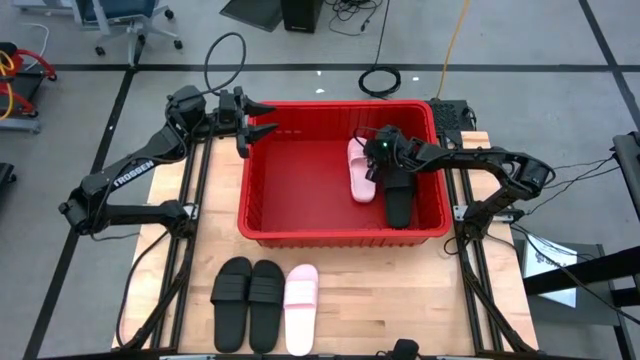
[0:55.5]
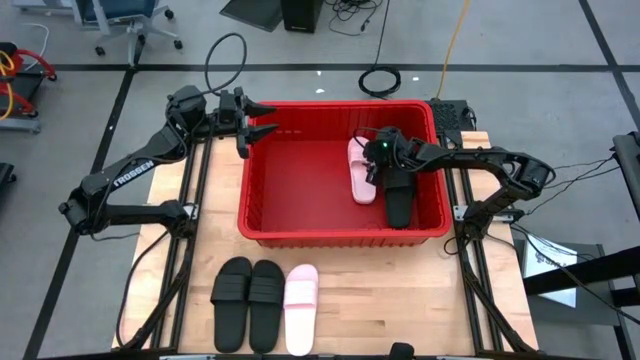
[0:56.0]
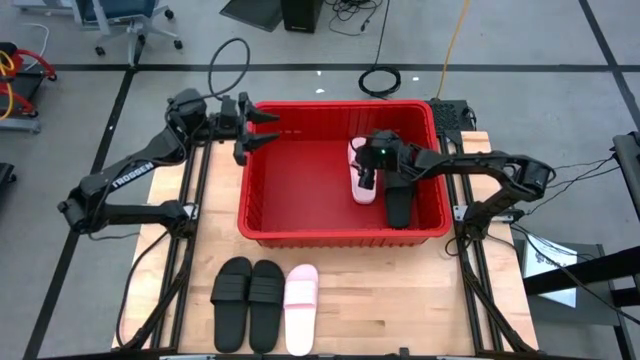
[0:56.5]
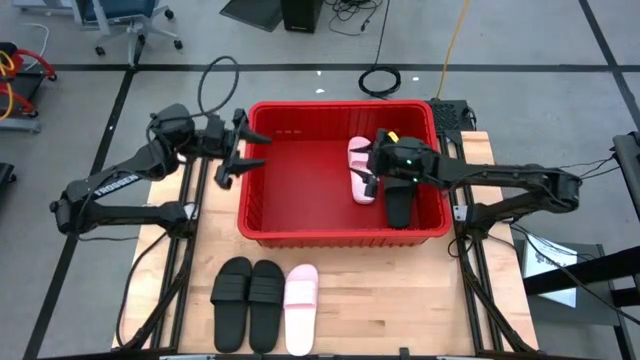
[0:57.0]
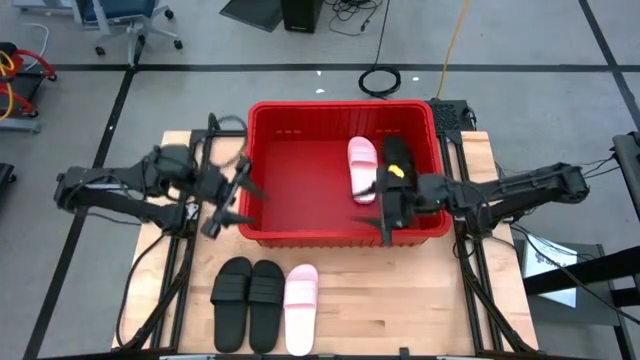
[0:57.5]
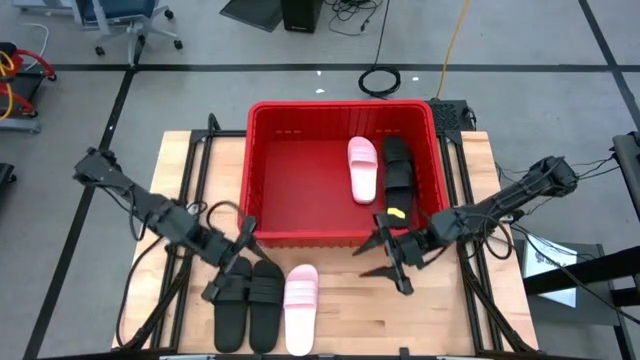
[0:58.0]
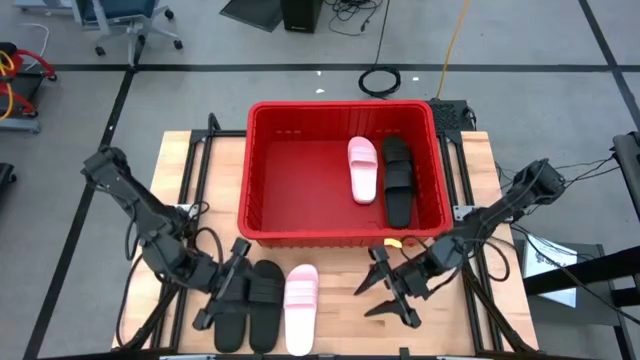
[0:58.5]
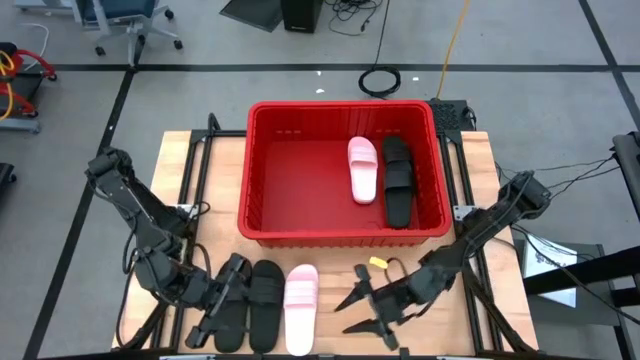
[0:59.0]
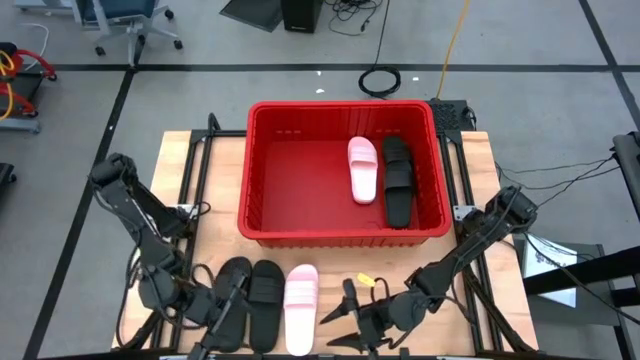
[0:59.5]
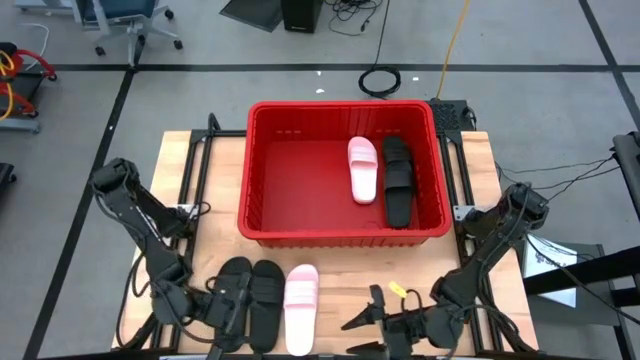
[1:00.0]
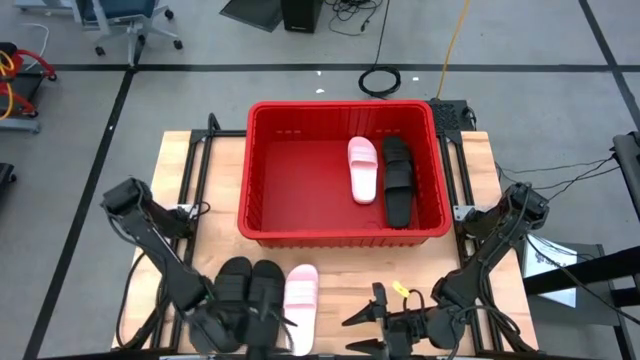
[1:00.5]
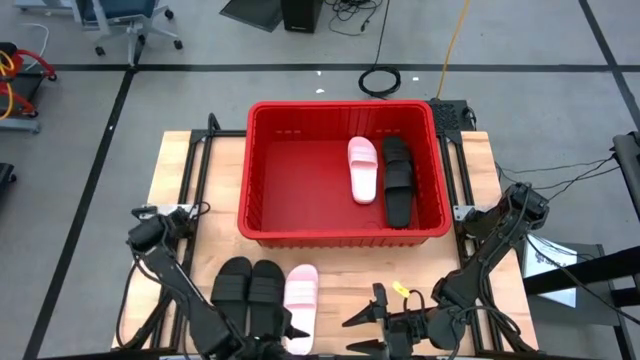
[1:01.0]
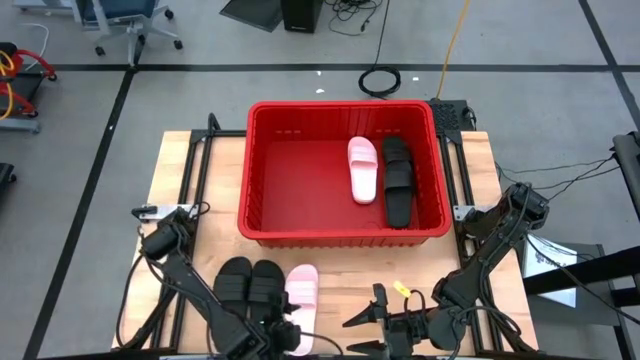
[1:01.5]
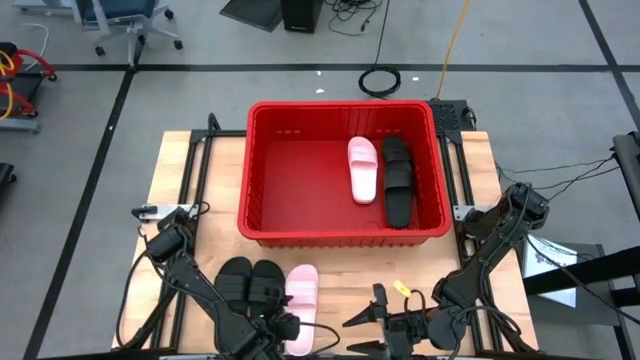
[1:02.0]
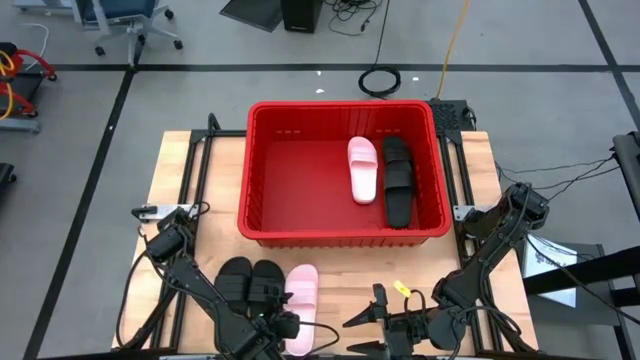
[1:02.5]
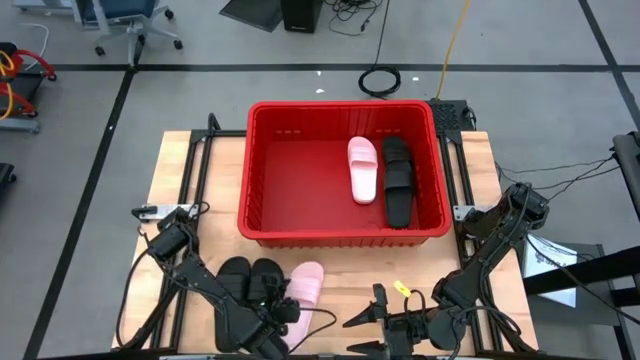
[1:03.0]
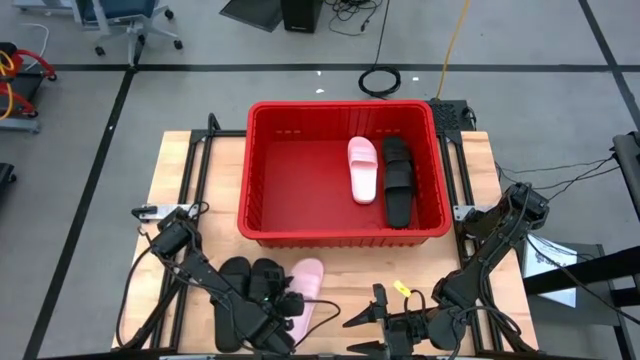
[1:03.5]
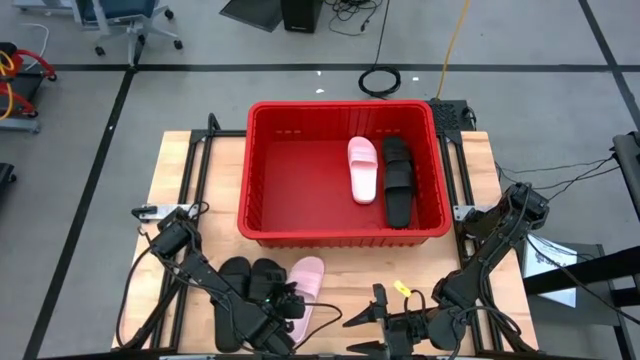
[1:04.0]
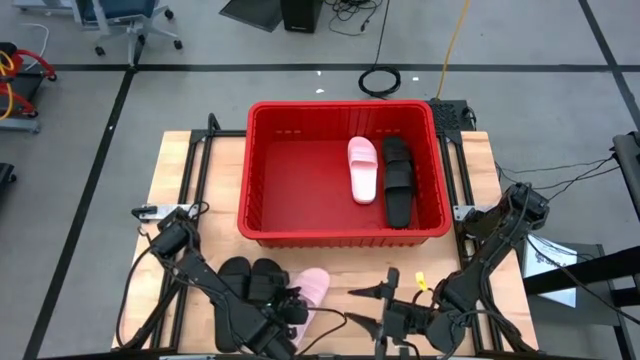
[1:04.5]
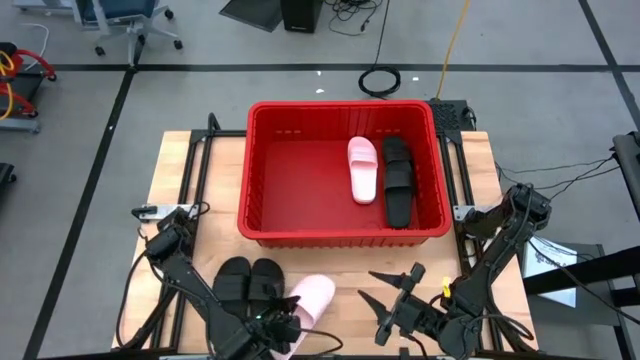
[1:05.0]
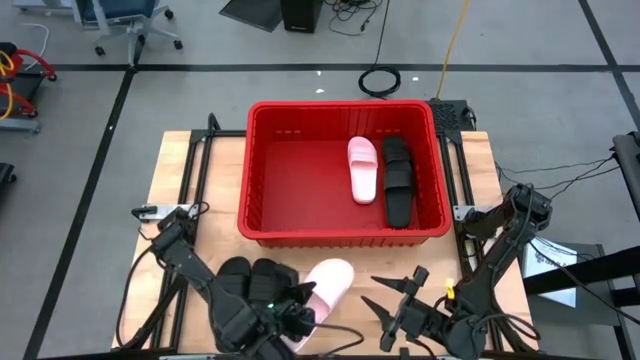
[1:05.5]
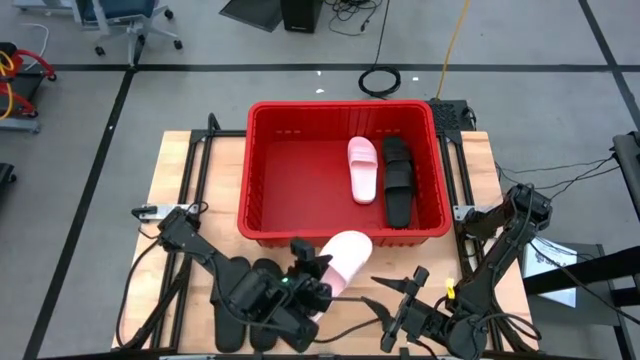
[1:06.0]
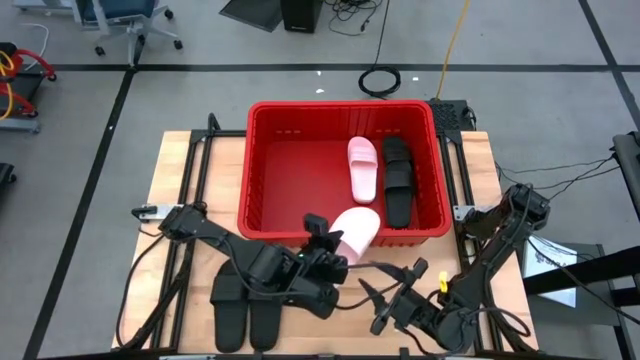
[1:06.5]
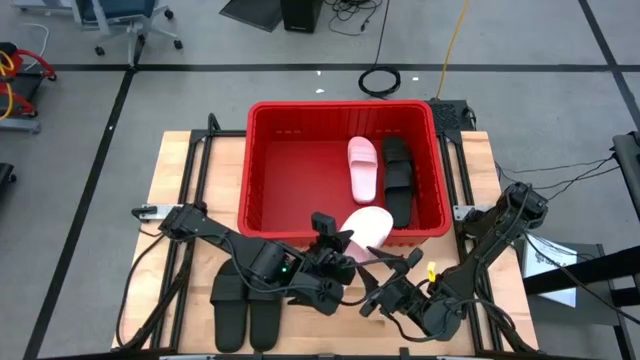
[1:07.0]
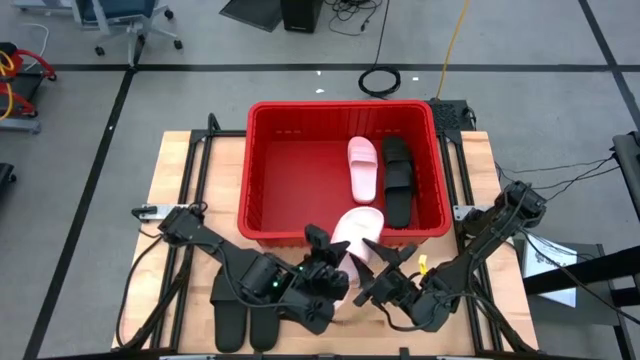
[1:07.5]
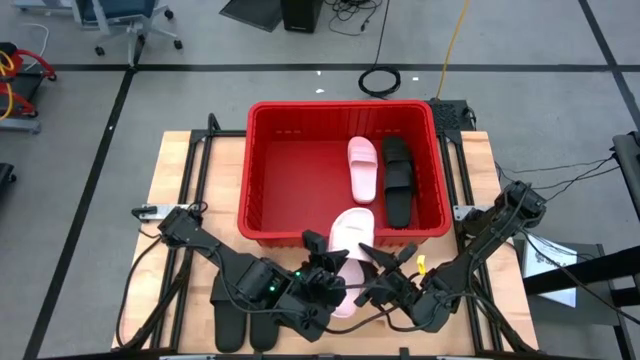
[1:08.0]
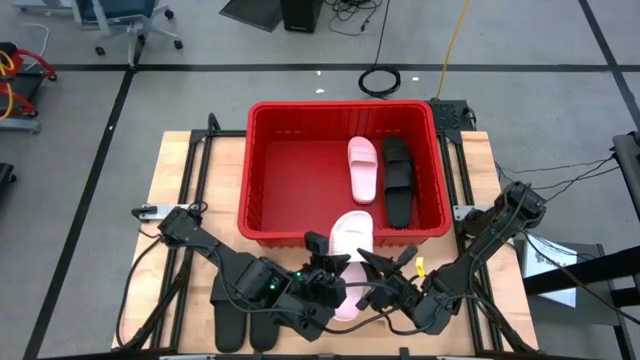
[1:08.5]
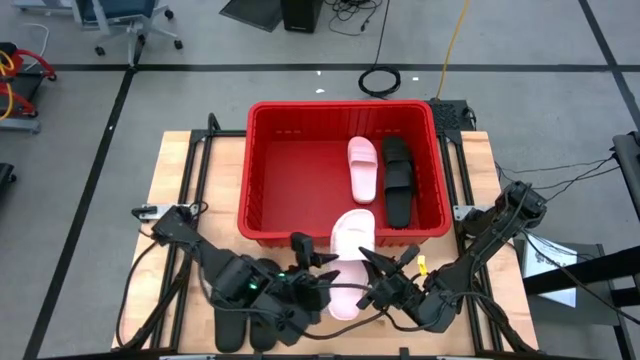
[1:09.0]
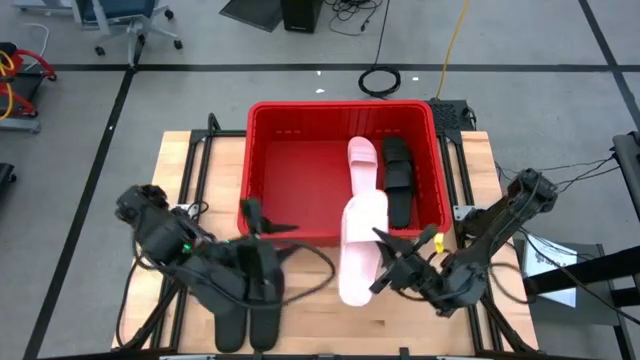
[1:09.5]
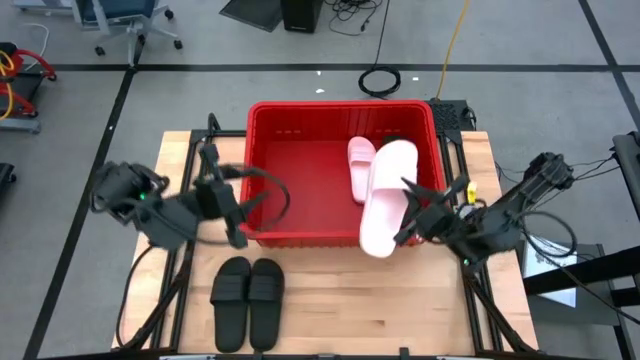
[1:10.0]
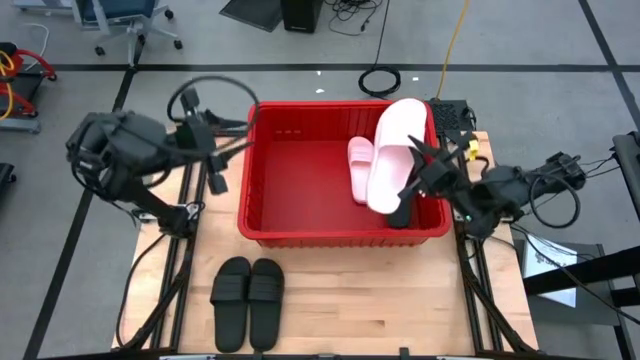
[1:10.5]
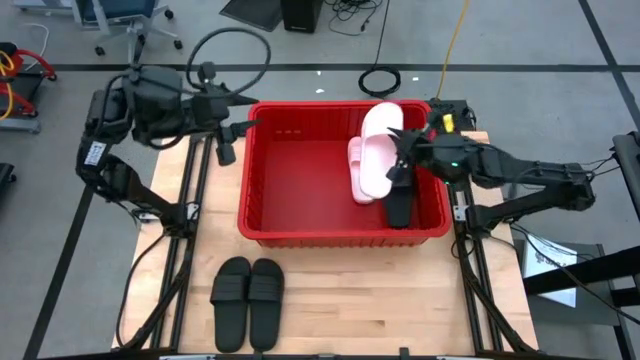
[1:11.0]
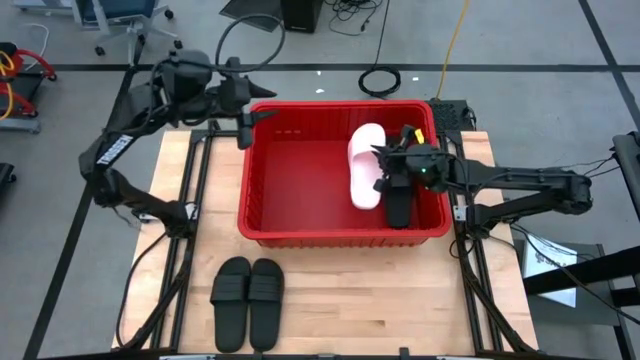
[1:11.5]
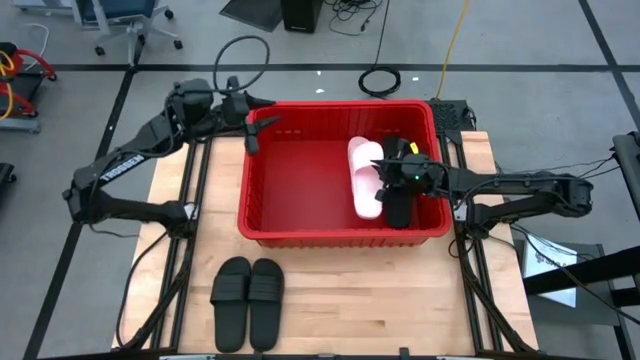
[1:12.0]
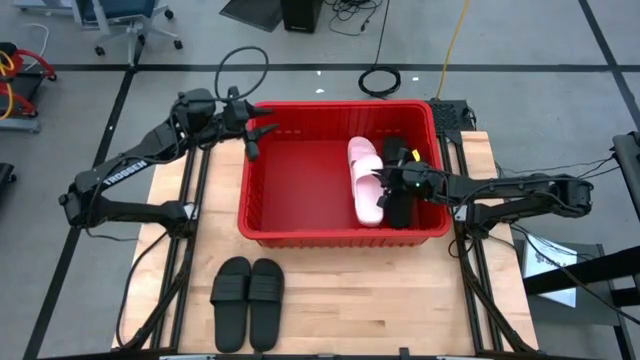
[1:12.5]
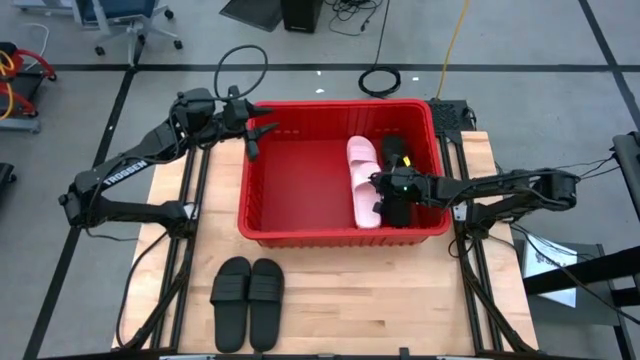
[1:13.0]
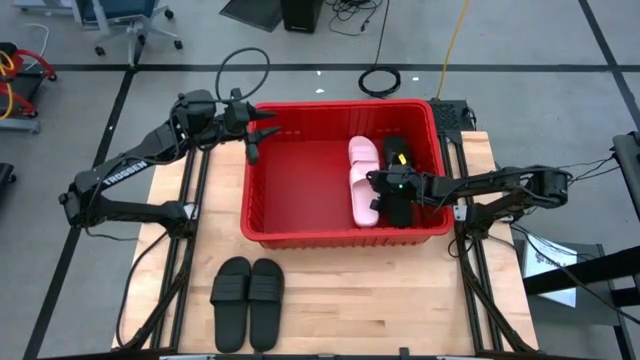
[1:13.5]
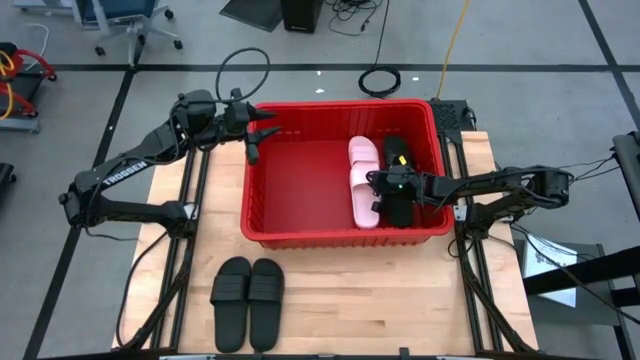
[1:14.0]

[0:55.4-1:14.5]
Task: Pick and place slides into bin
Put the pink slide into the red organizer bin

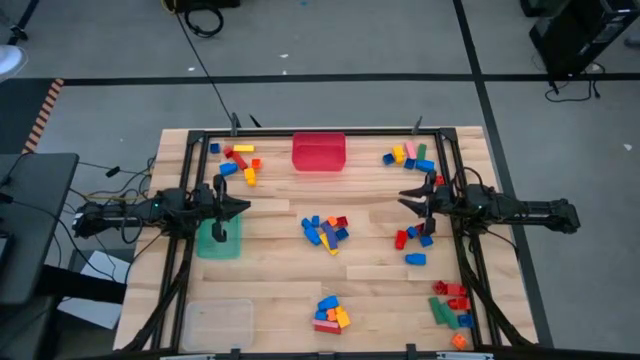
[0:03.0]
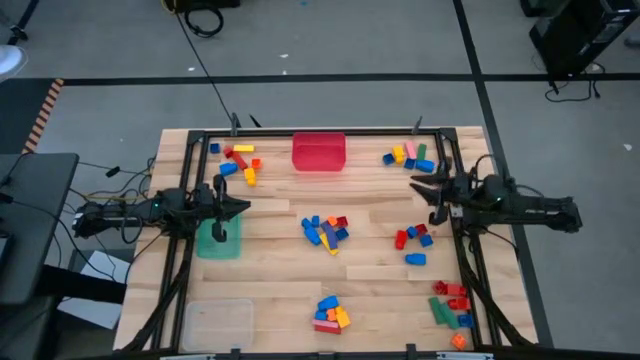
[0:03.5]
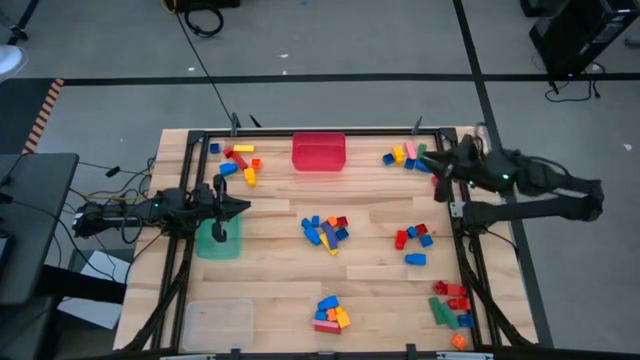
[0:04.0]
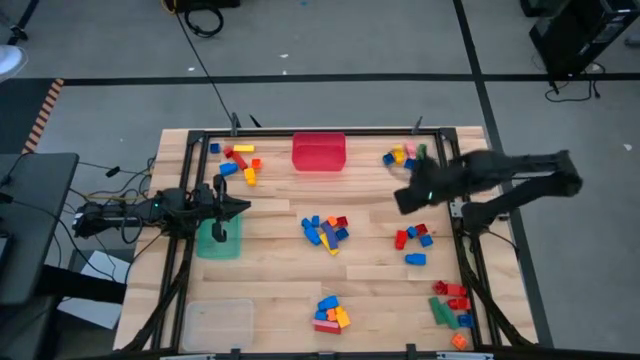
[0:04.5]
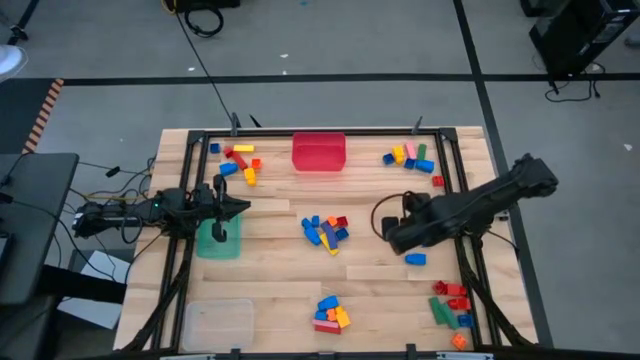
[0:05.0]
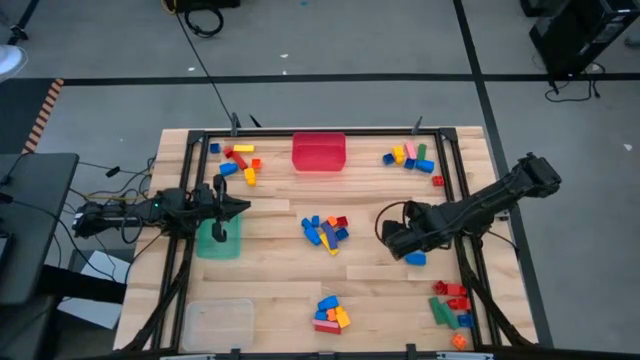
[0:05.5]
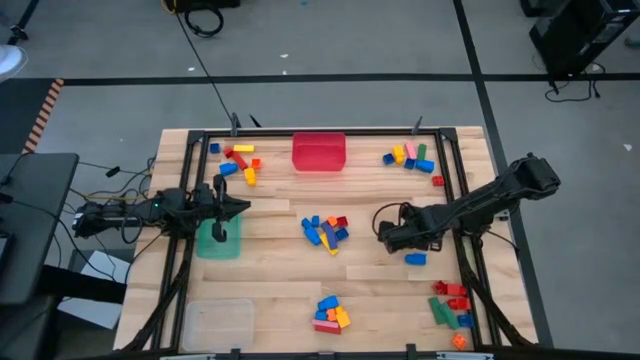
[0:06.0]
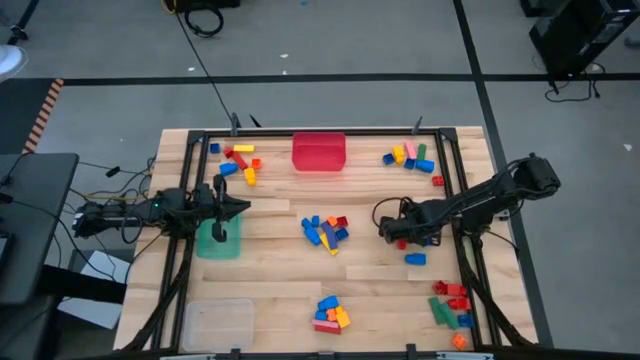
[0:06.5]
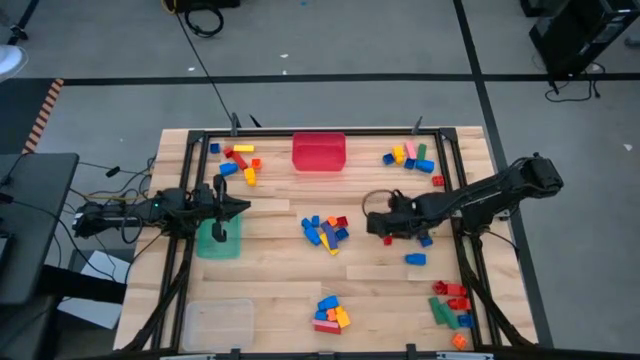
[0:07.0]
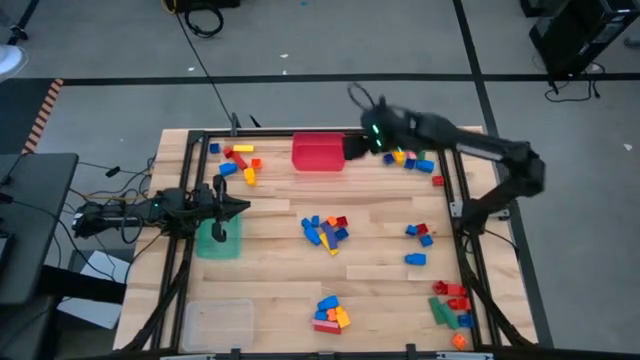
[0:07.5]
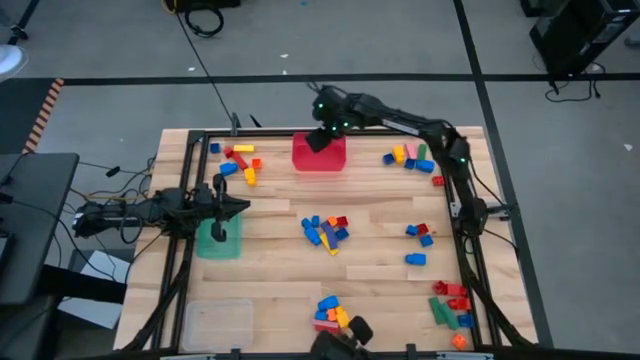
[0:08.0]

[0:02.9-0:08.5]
Task: Sort blocks by size
Put the red 1 studded building block into the red bin
